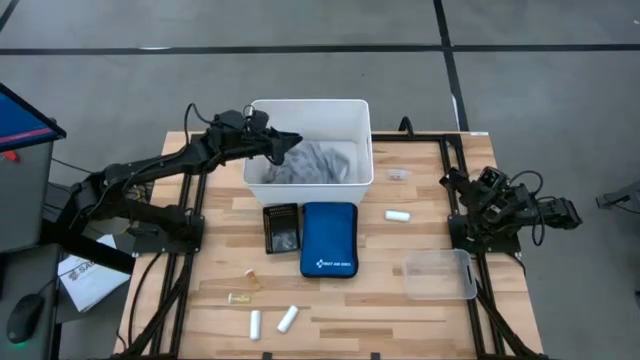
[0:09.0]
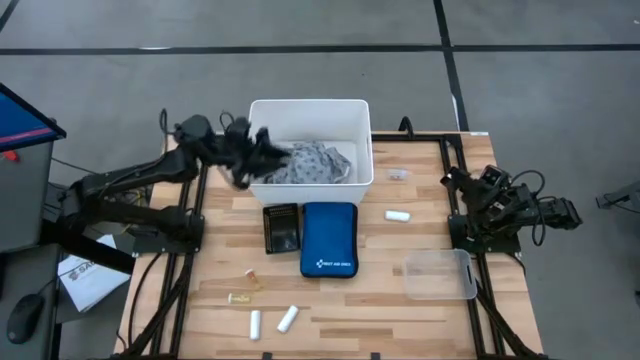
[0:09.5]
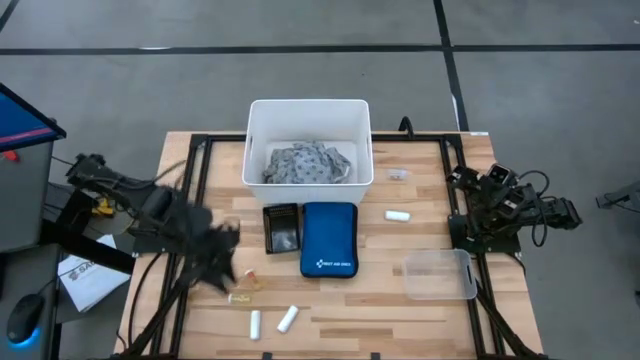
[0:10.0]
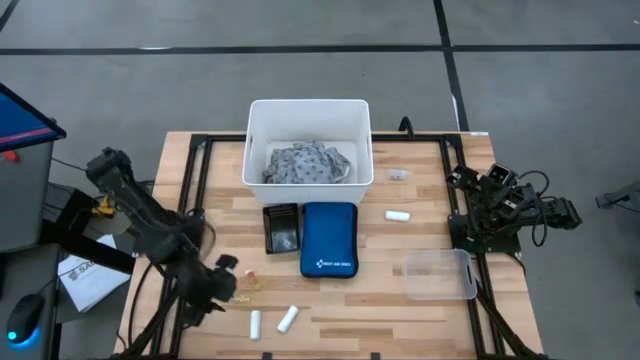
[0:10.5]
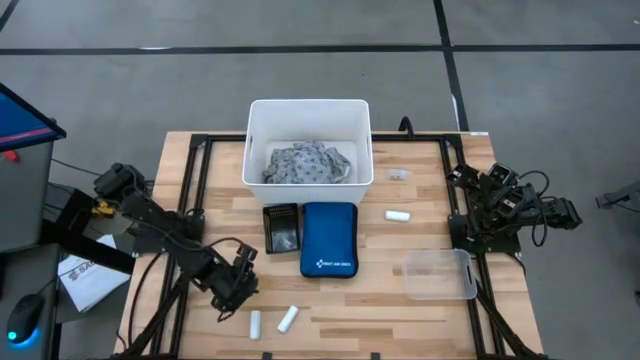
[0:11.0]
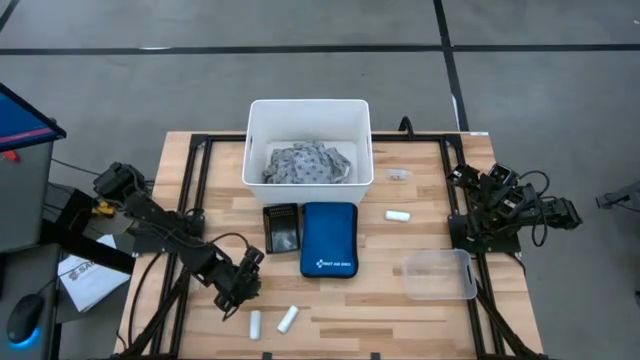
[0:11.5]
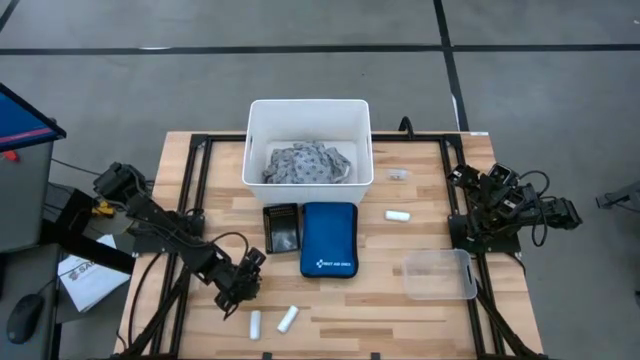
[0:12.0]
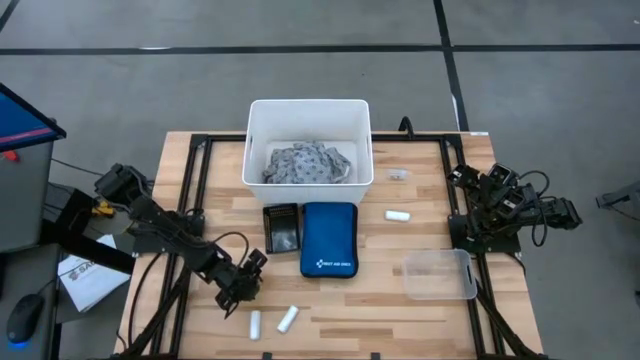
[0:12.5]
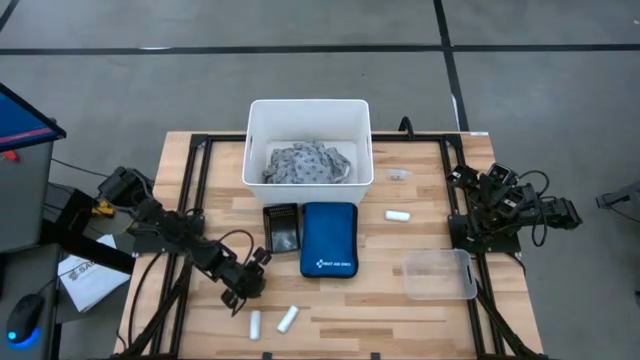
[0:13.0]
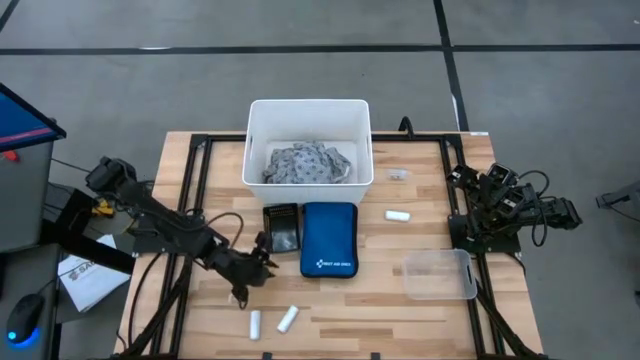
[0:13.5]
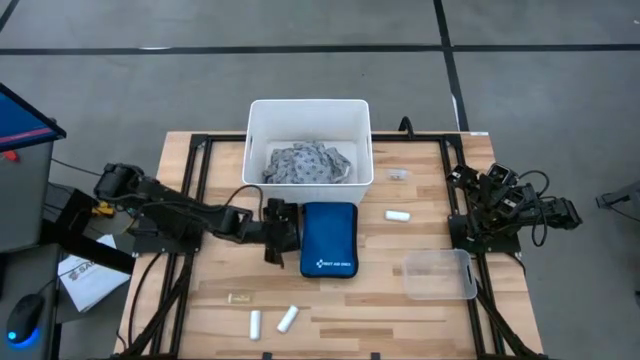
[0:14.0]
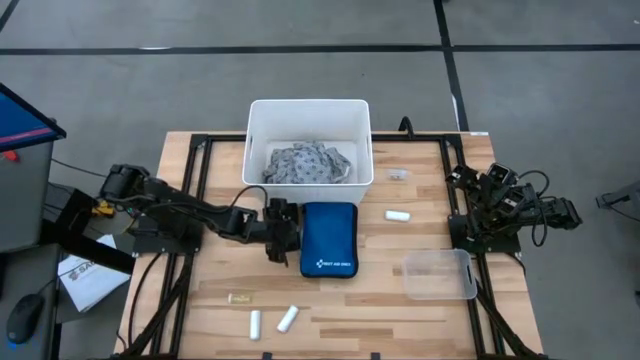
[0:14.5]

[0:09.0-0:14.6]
Task: Pick & place medical supplies in basket/bin
Put the top yellow pill bottle into the black bin

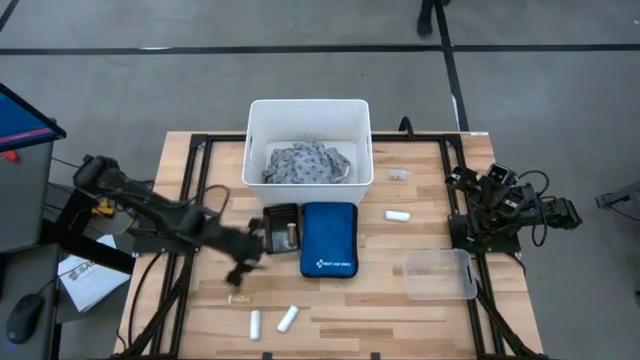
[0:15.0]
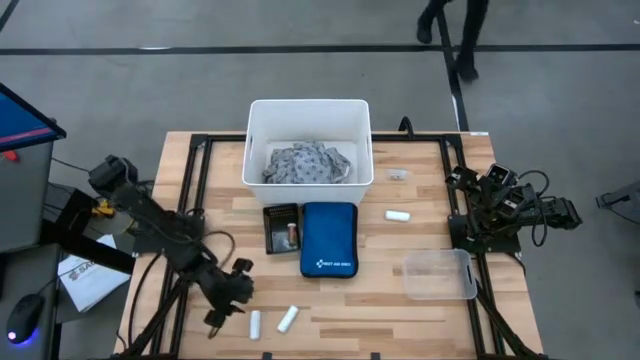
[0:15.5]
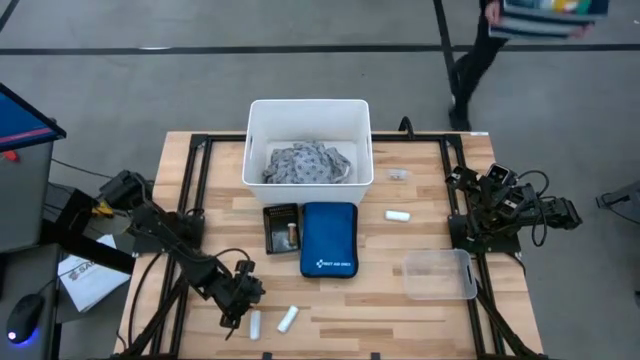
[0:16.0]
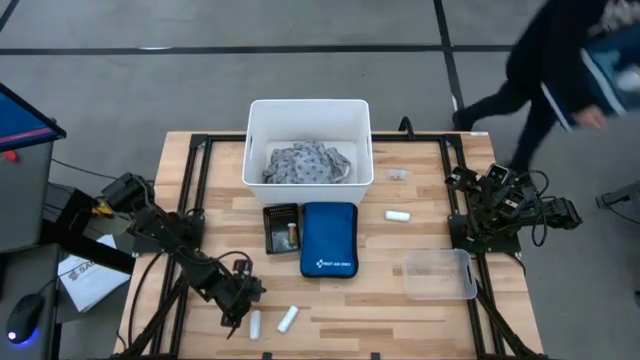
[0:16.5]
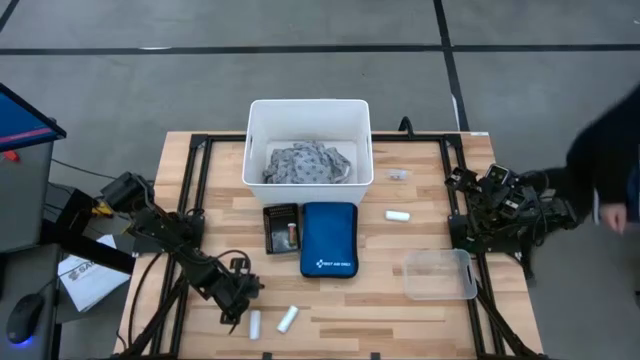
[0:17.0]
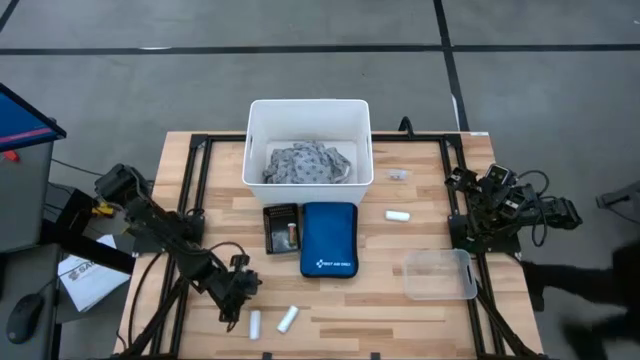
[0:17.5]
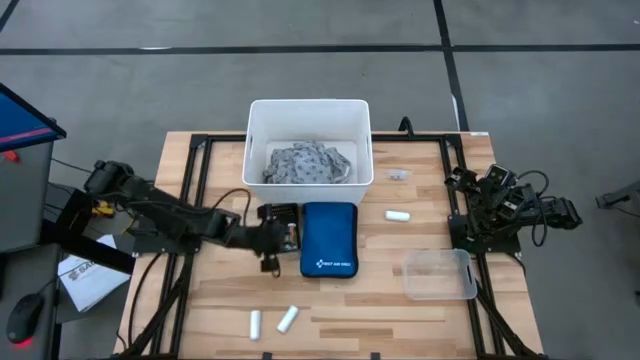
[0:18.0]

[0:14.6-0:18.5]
Put the yellow pill bottle into the black bin

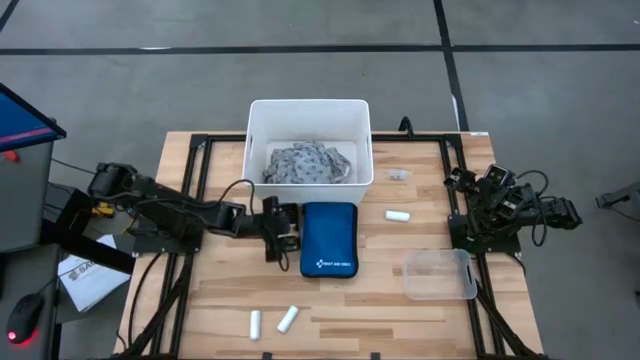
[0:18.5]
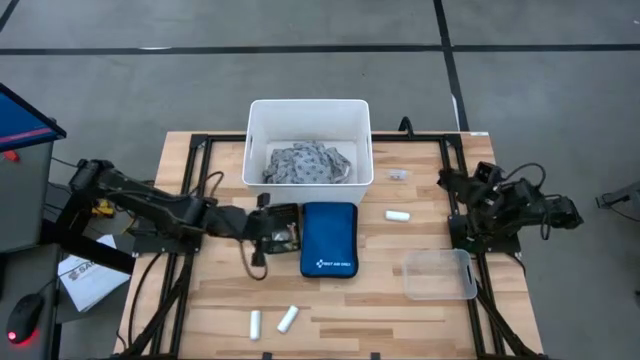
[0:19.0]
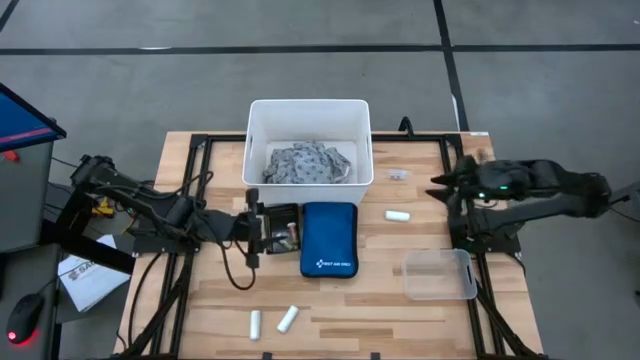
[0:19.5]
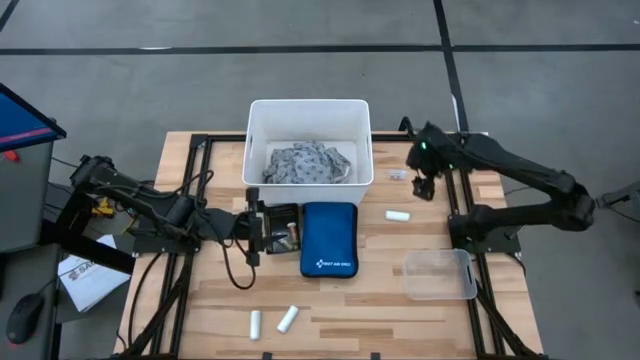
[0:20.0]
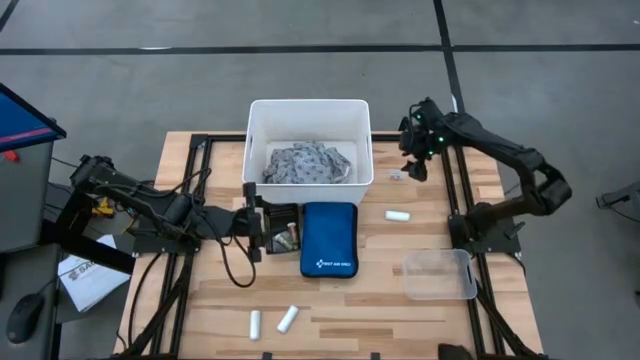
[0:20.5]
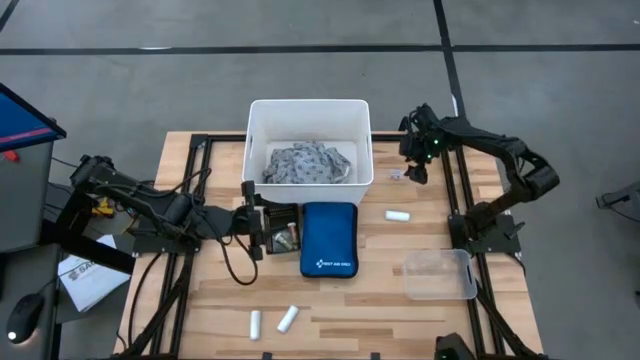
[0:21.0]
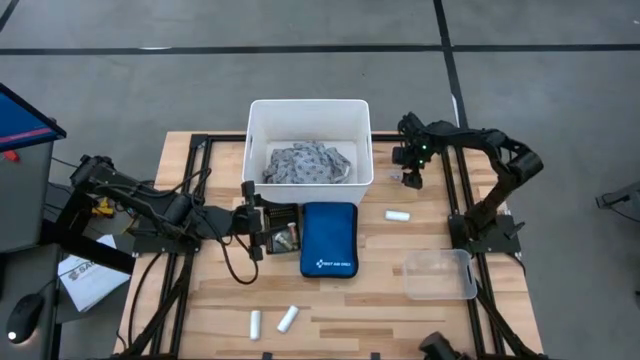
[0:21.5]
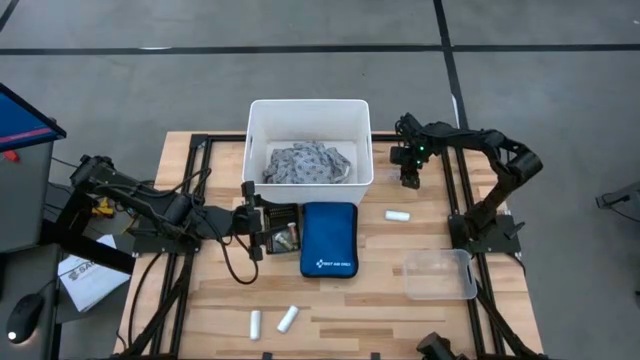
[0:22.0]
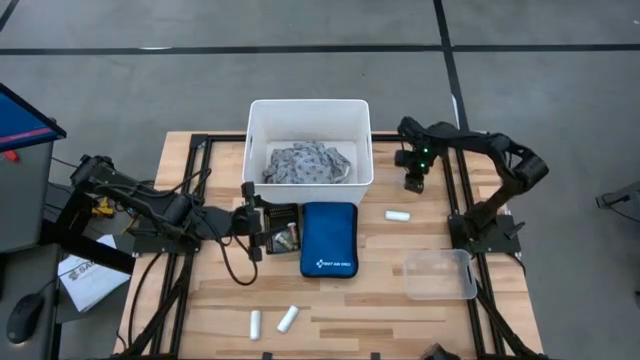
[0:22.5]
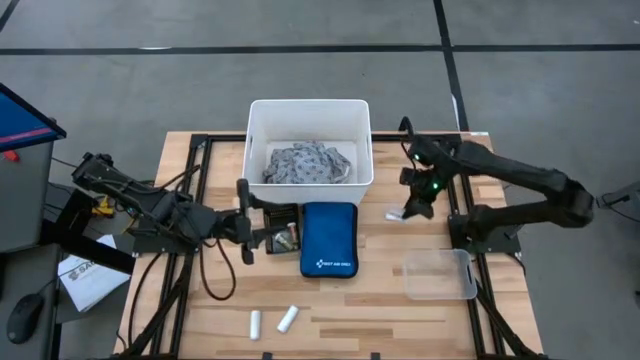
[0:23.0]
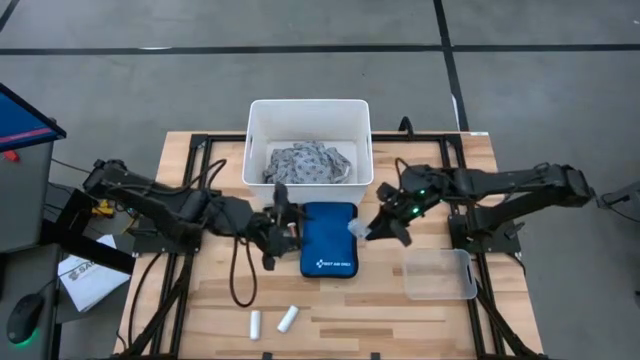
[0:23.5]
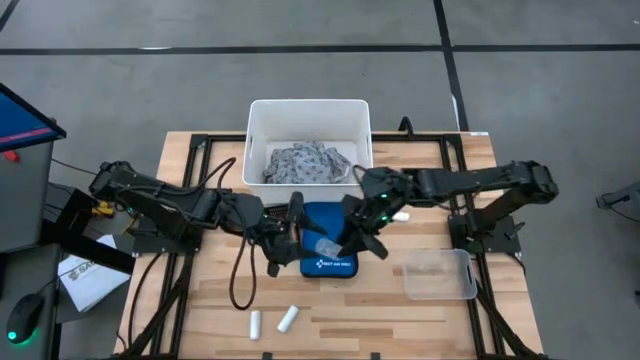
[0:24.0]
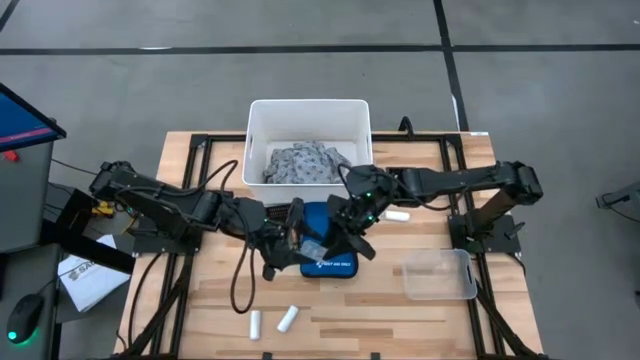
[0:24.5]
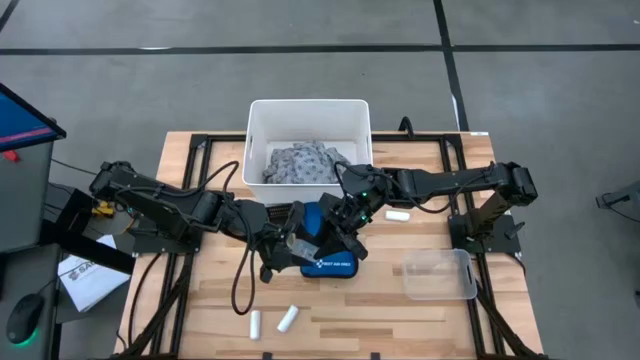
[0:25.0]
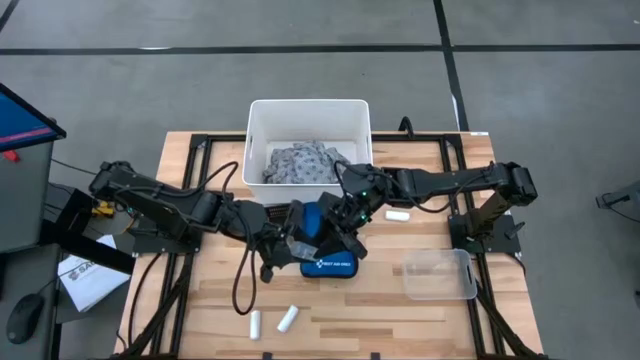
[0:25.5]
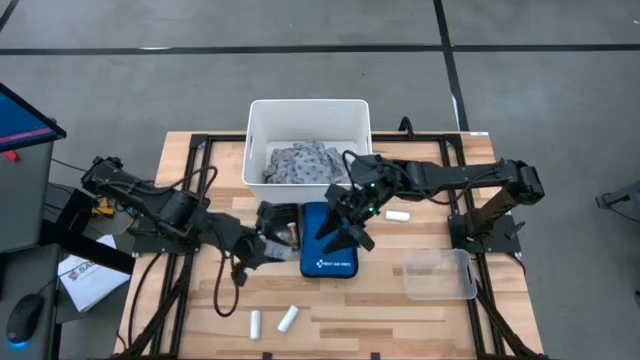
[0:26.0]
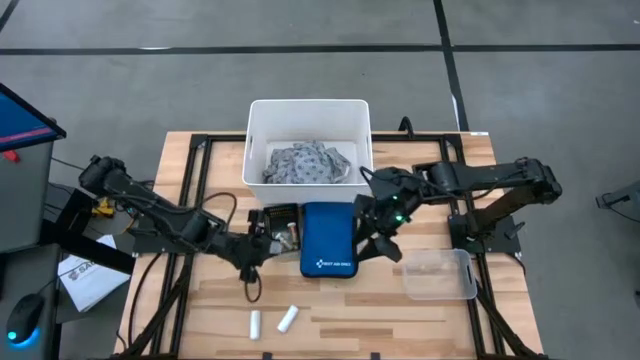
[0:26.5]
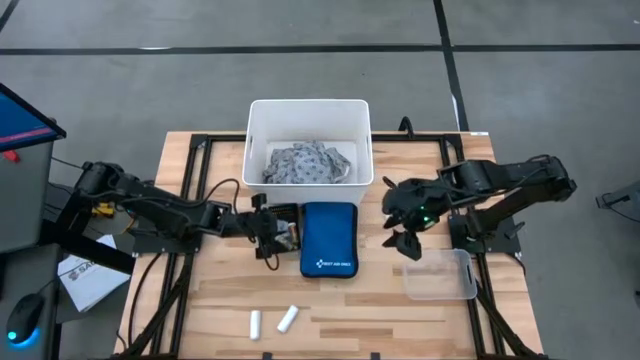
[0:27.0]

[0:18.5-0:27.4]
Put the transparent pill bottle into the black bin

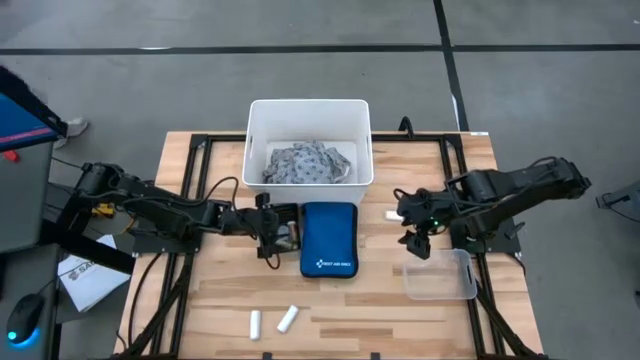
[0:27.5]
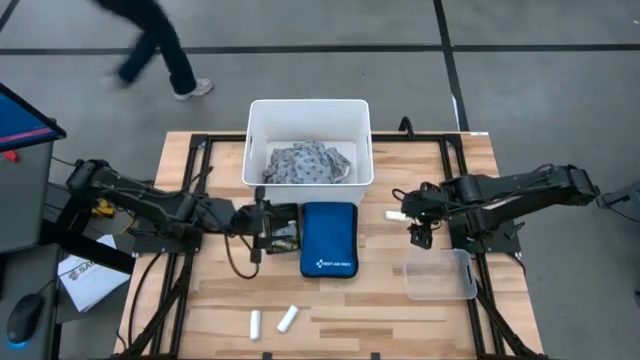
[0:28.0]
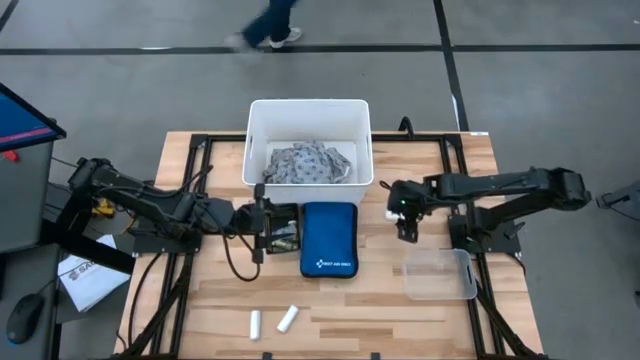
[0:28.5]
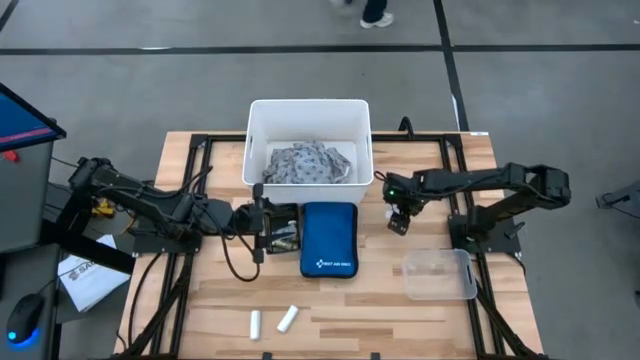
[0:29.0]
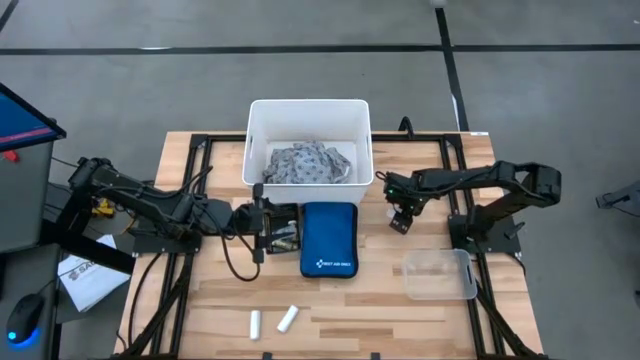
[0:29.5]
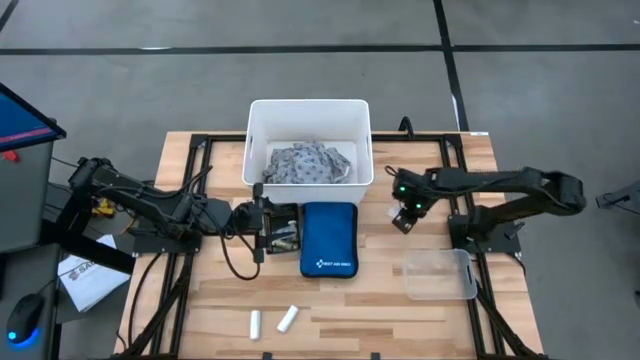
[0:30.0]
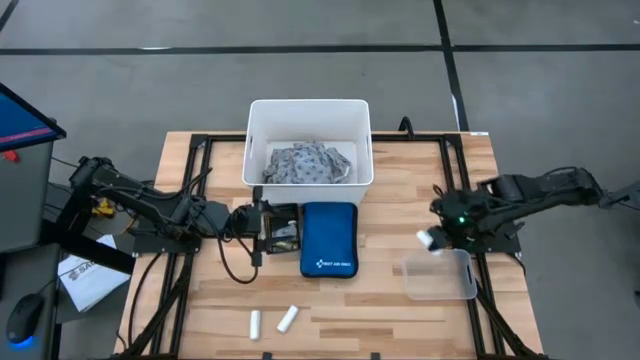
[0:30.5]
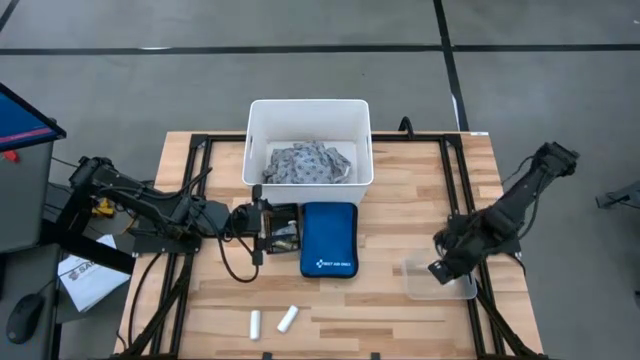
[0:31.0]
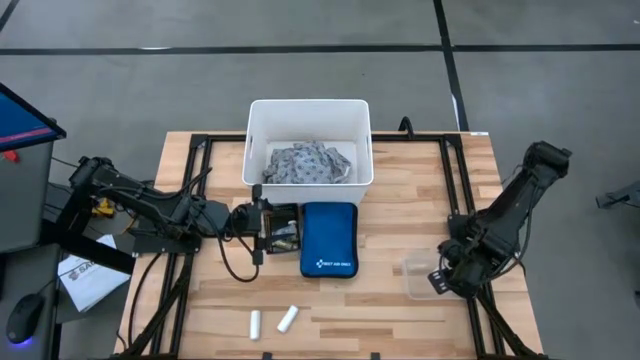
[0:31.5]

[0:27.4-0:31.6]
Put the top white rolled gauze into the transparent bin
